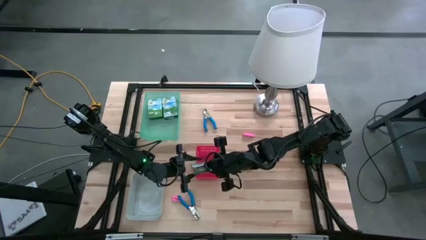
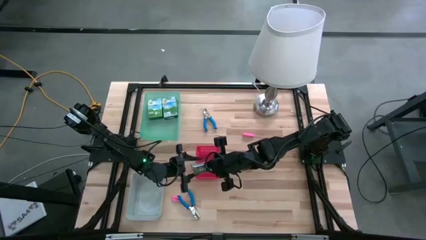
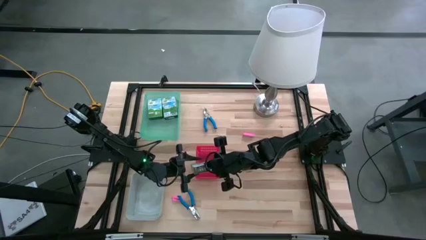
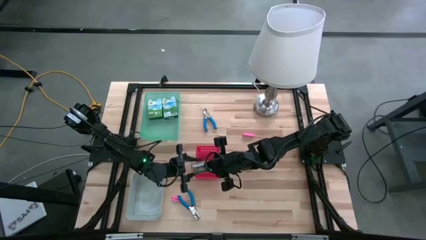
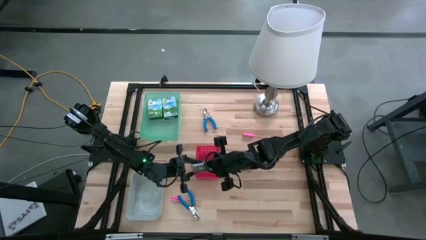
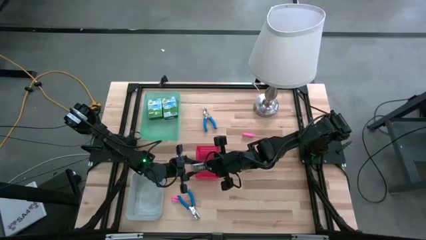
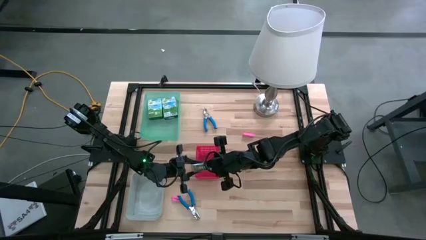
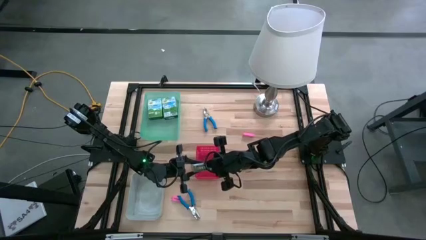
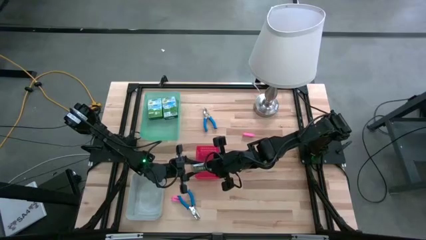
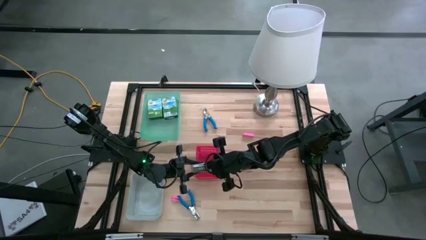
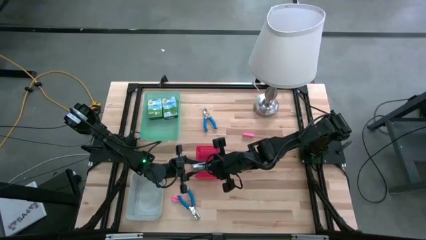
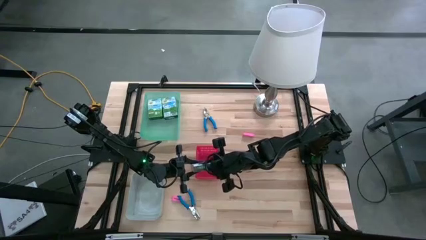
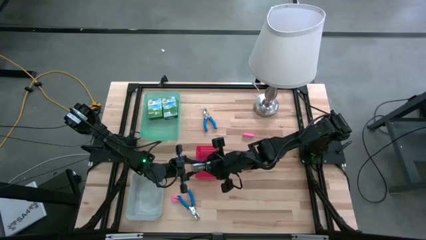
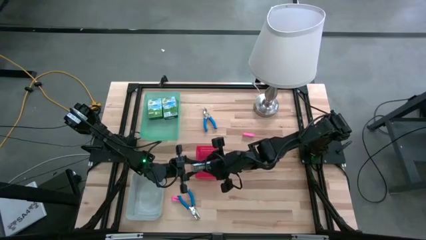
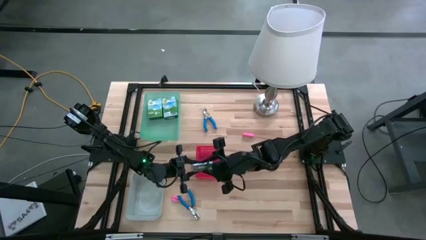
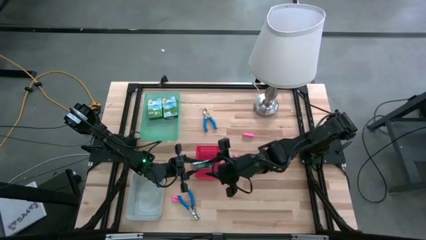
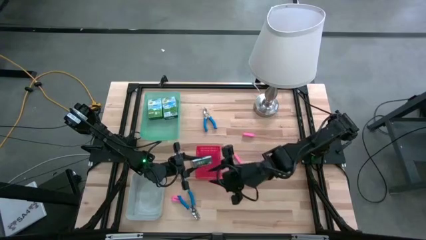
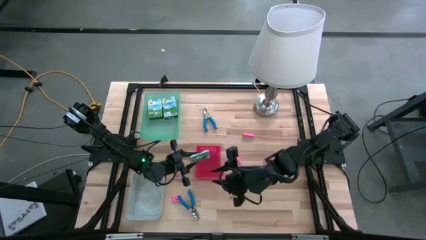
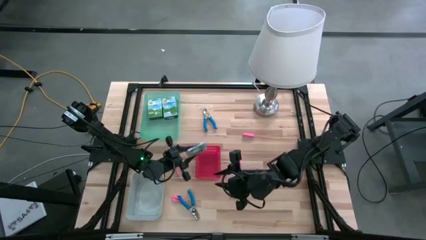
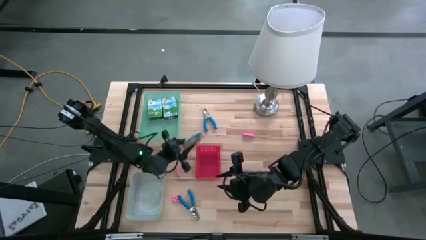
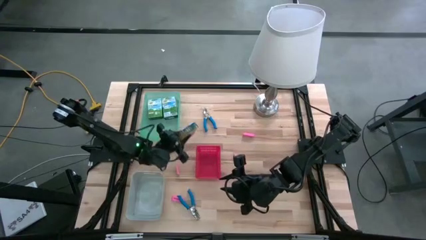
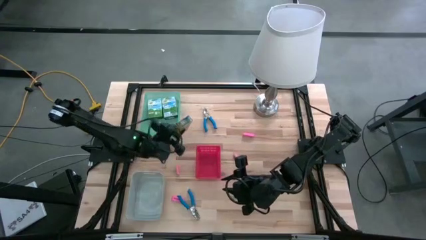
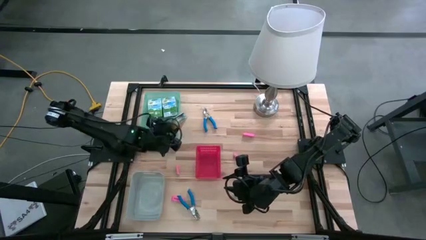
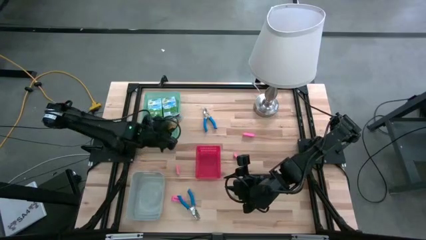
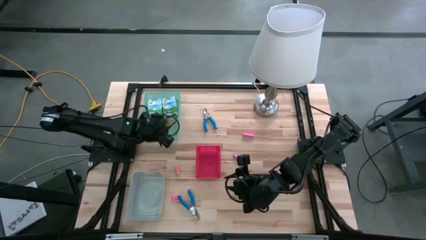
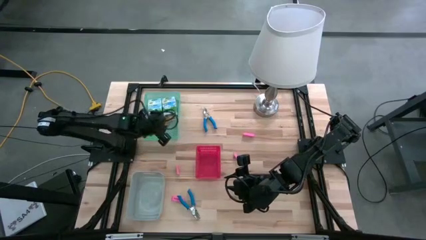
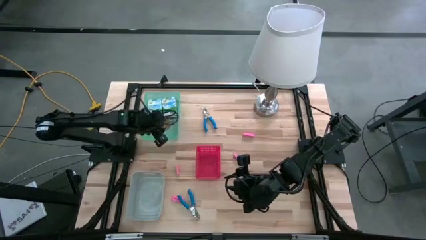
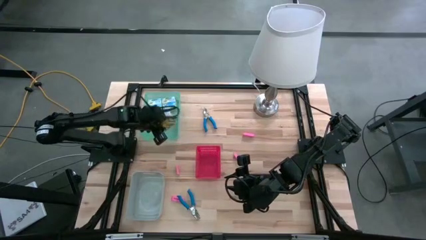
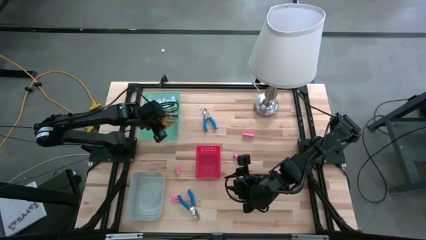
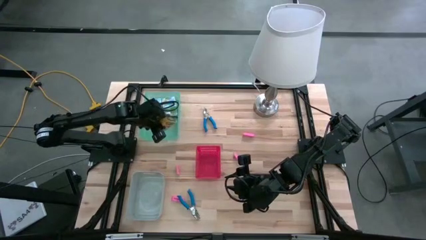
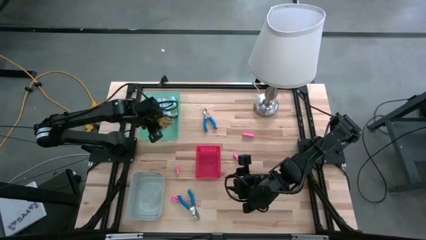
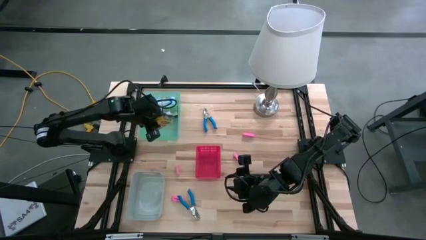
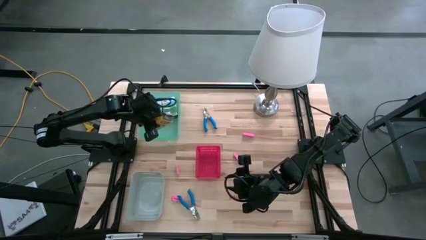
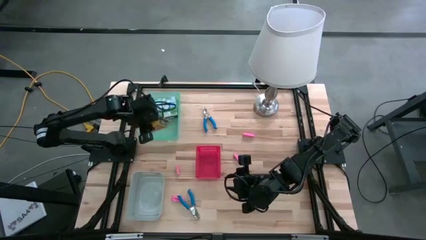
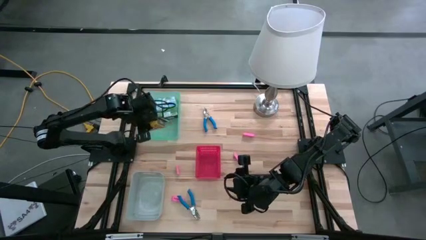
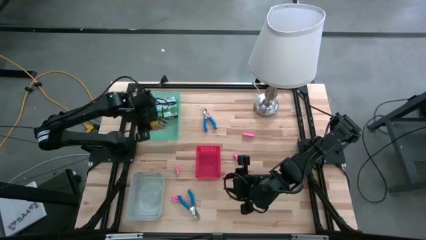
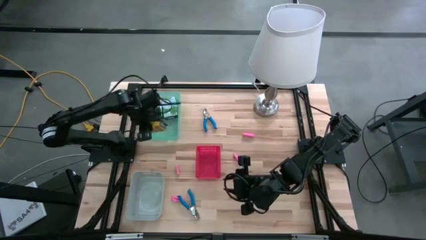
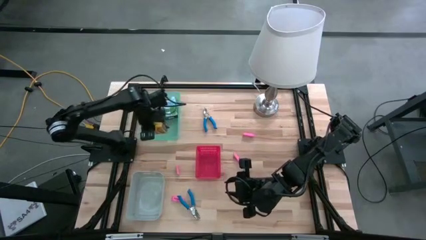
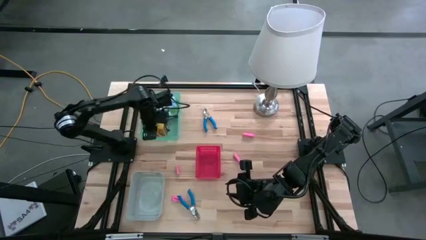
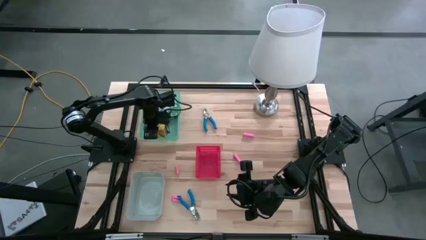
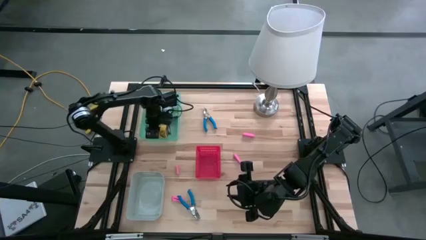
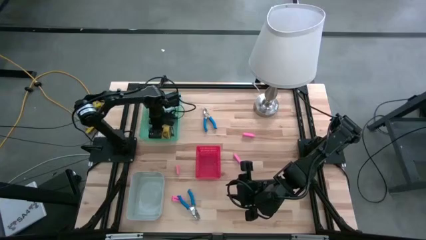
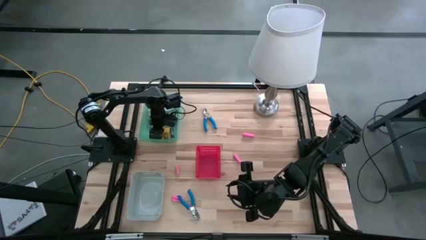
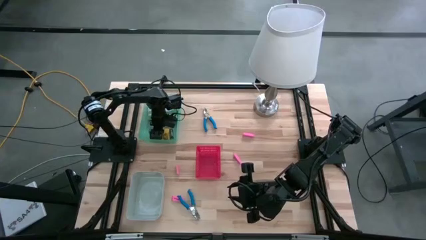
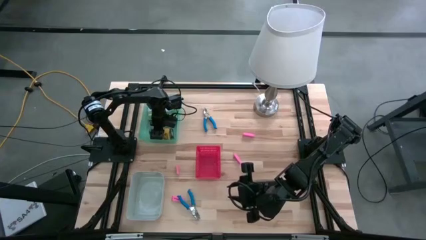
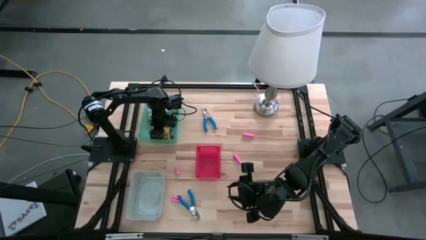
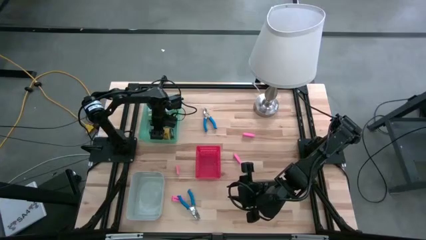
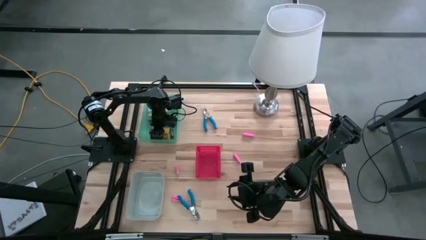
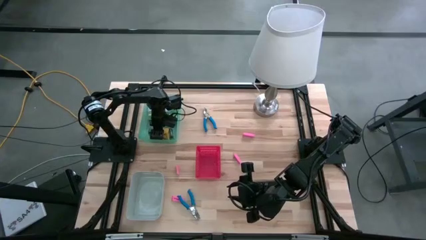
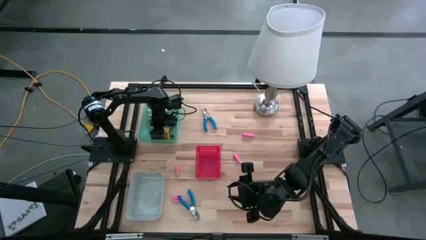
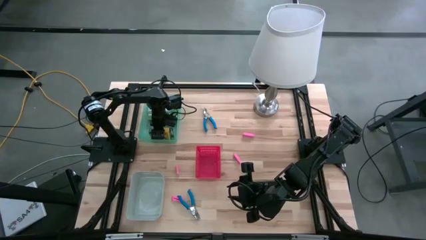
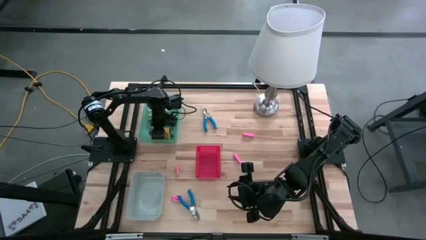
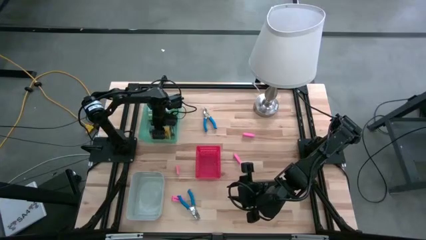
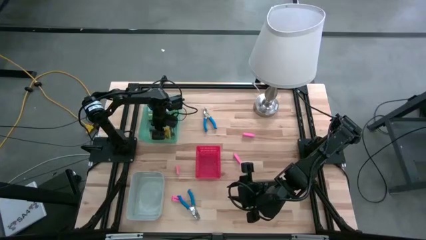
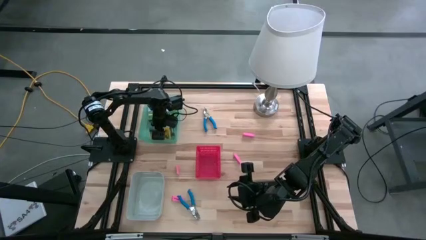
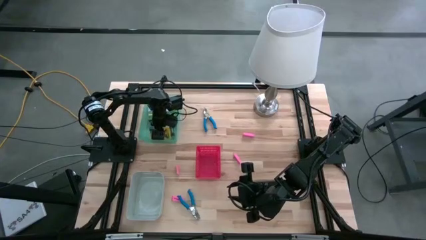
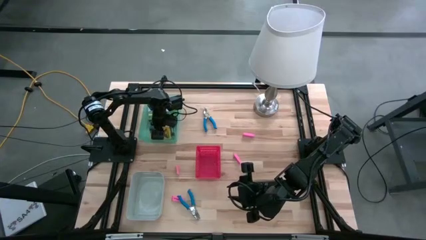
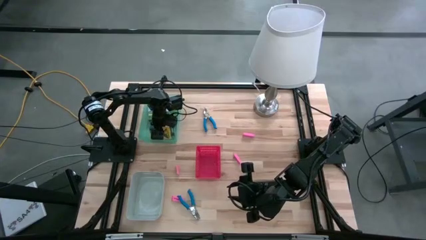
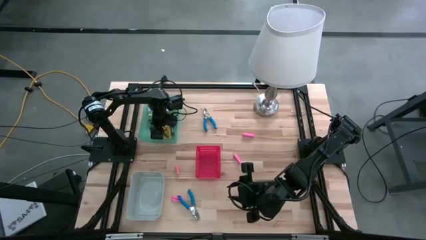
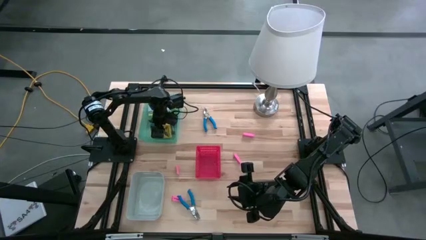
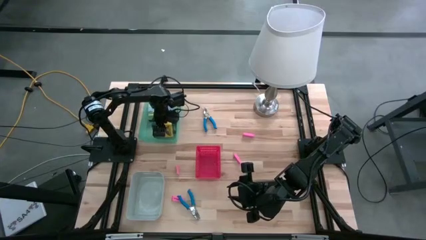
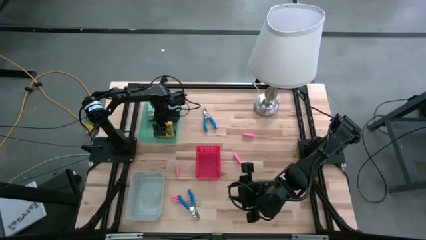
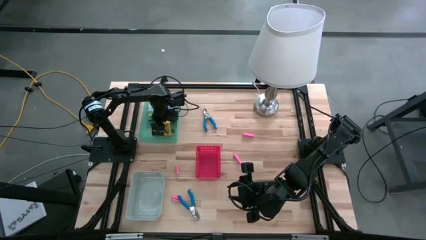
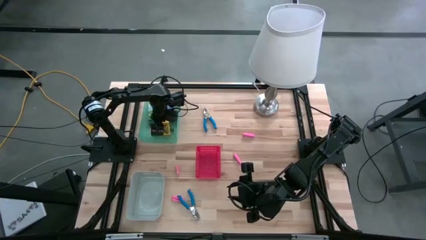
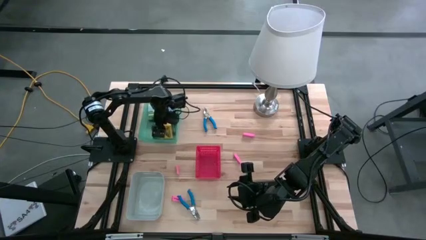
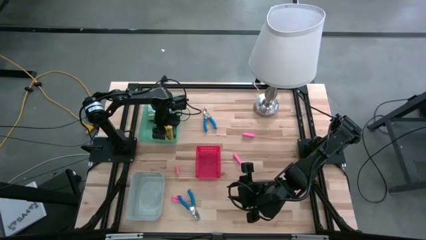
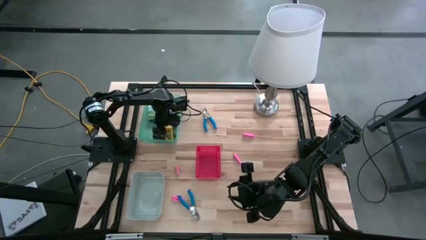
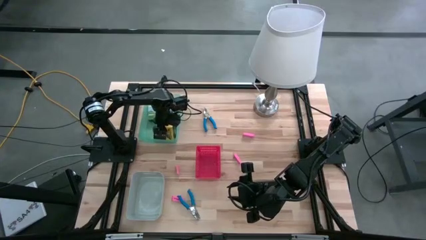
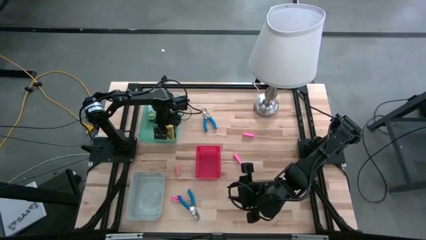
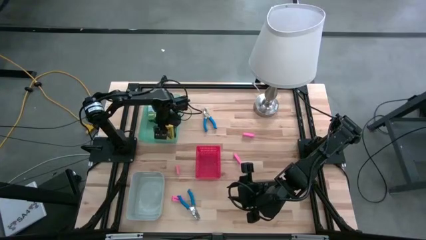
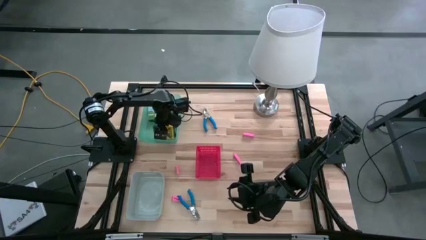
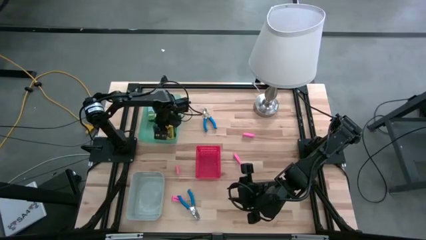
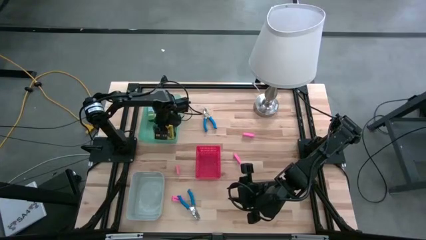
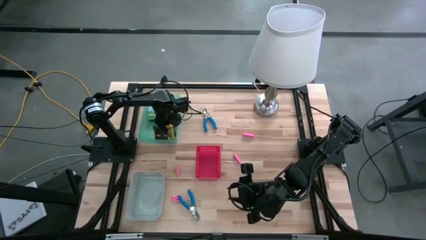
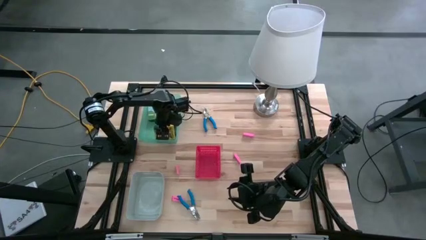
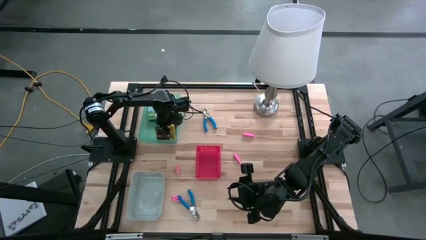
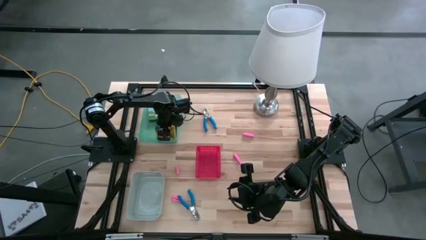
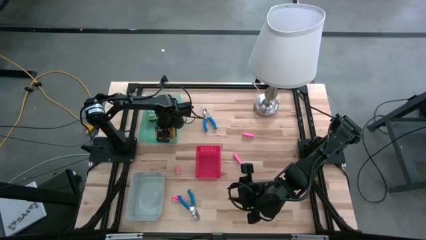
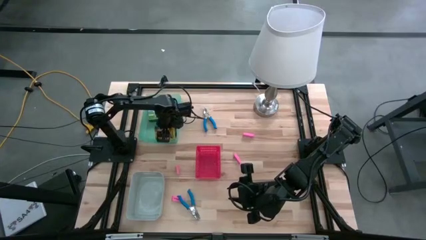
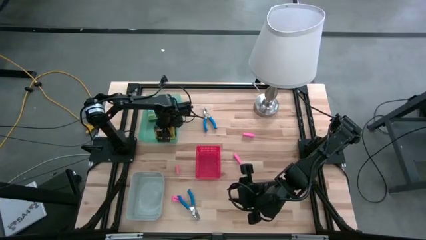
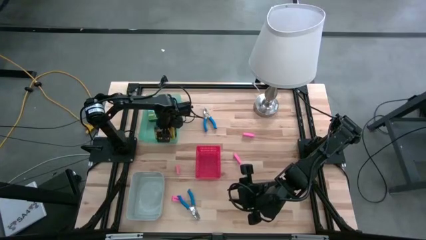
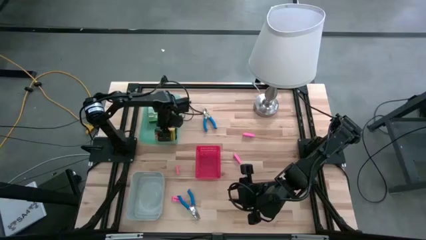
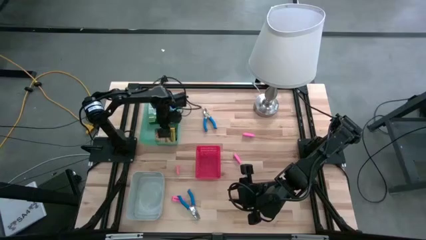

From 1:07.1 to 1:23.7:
Task: Pick & Place School Supplies
Put the yellow crayon box into the green bin
